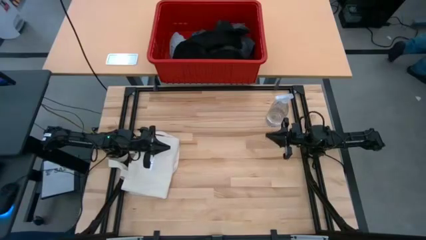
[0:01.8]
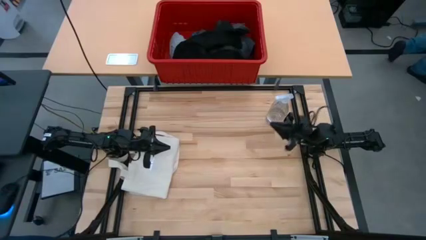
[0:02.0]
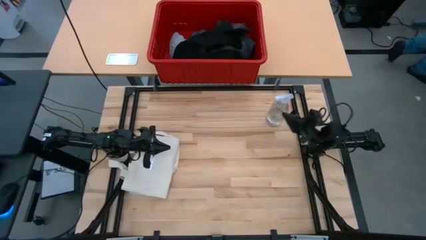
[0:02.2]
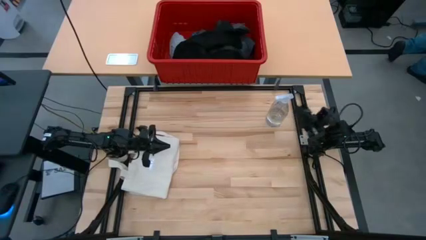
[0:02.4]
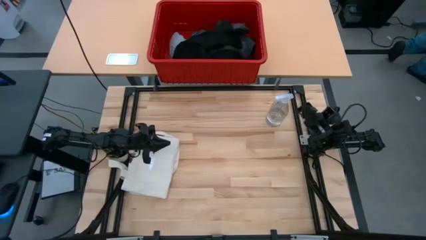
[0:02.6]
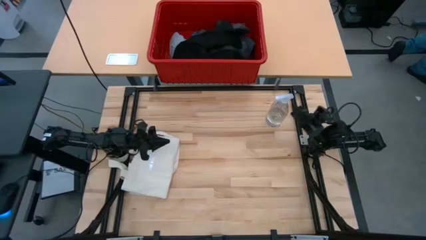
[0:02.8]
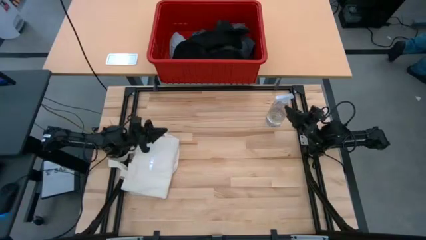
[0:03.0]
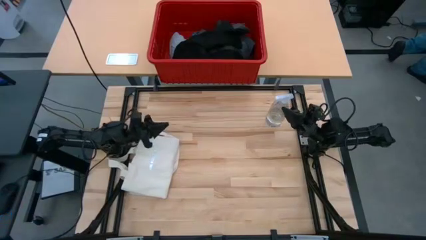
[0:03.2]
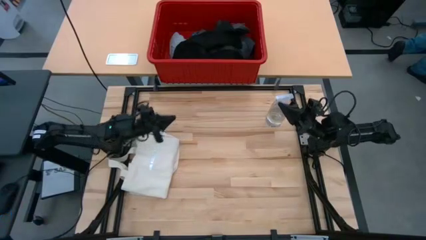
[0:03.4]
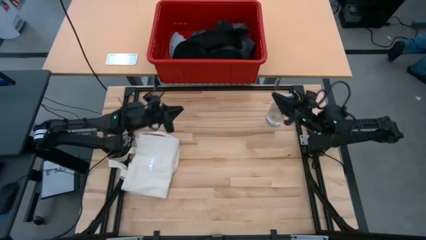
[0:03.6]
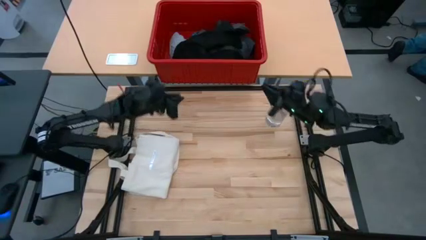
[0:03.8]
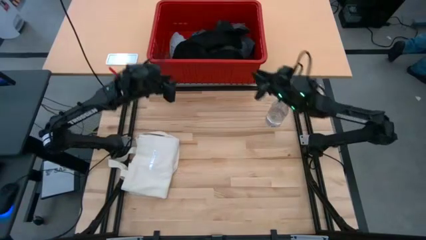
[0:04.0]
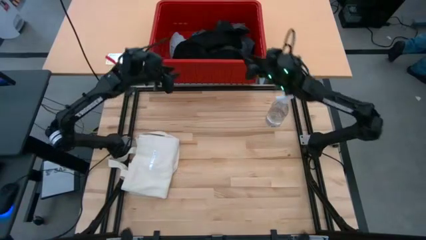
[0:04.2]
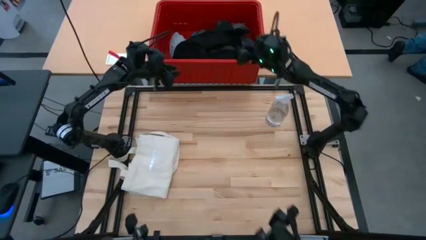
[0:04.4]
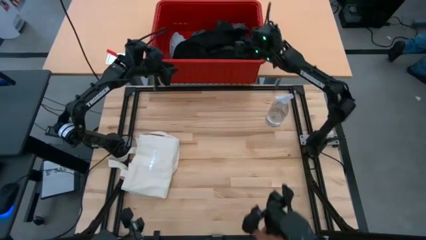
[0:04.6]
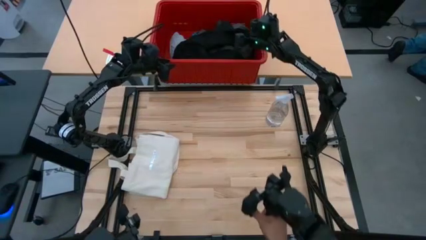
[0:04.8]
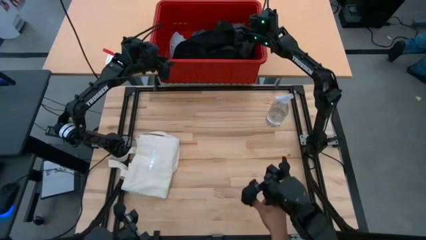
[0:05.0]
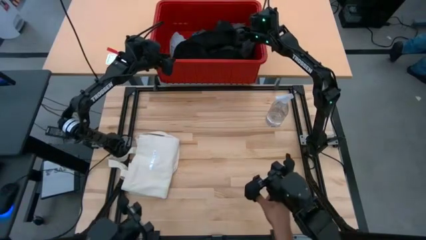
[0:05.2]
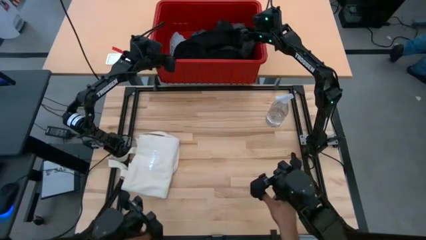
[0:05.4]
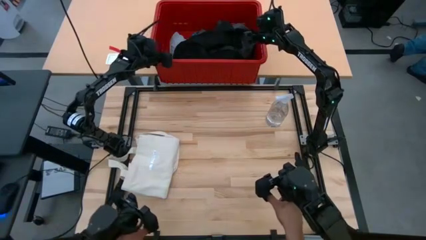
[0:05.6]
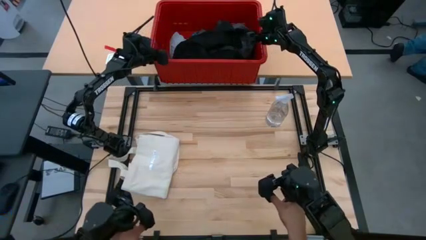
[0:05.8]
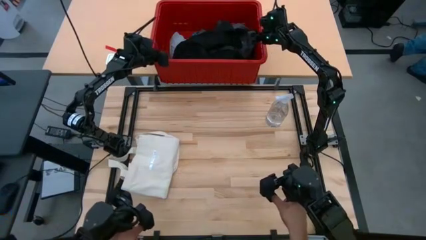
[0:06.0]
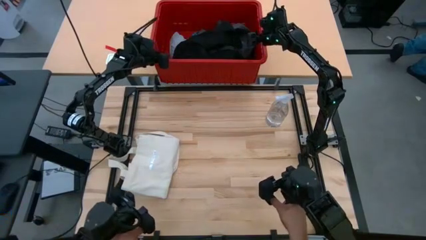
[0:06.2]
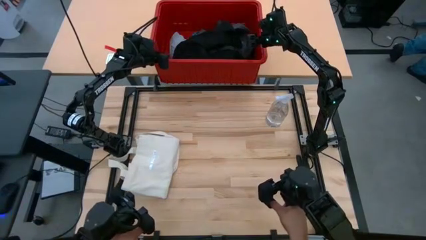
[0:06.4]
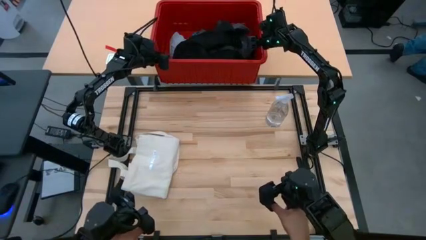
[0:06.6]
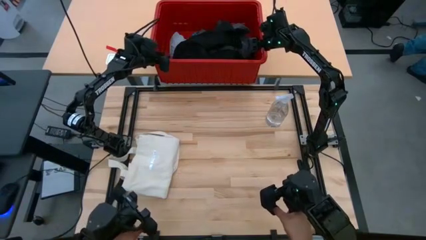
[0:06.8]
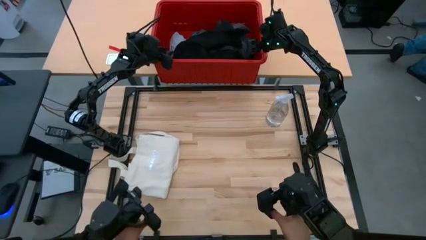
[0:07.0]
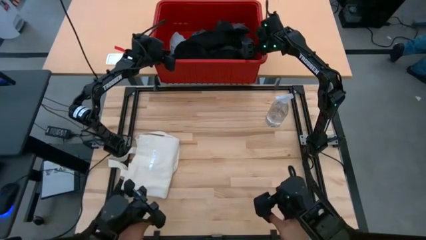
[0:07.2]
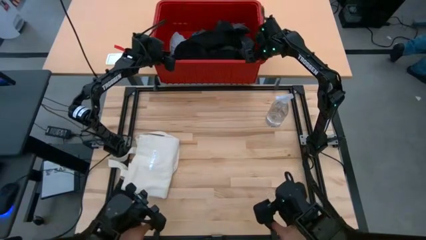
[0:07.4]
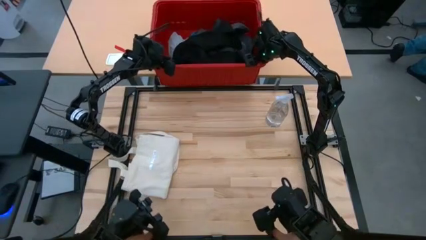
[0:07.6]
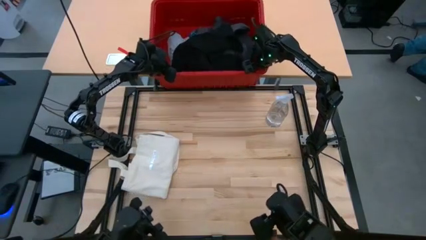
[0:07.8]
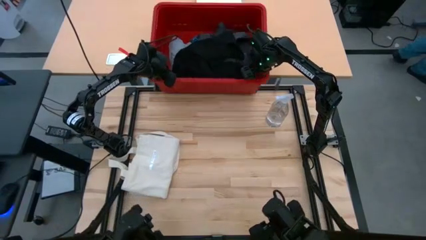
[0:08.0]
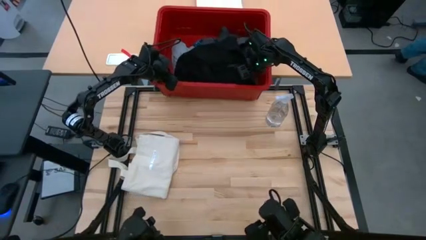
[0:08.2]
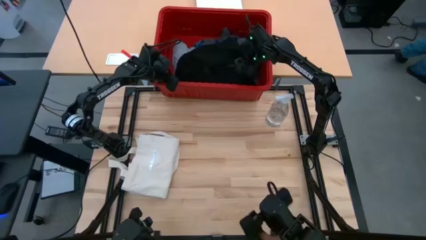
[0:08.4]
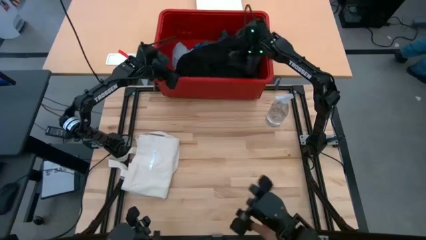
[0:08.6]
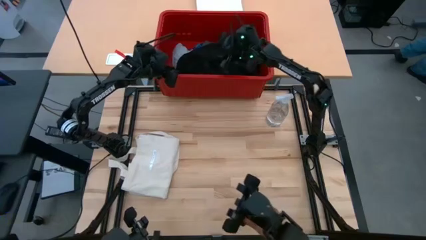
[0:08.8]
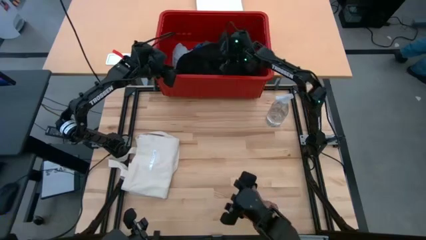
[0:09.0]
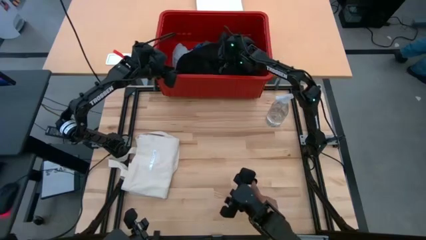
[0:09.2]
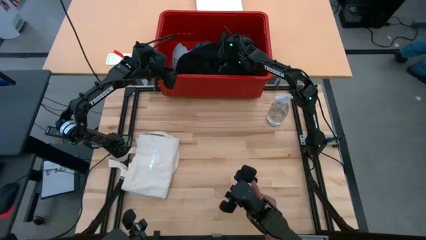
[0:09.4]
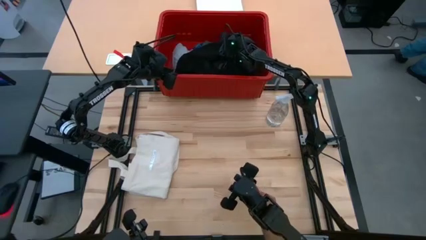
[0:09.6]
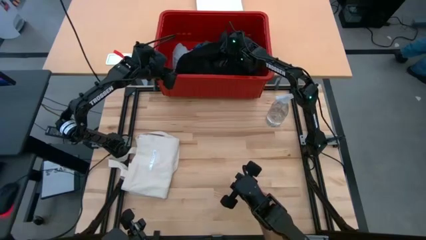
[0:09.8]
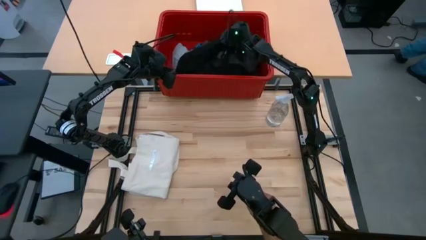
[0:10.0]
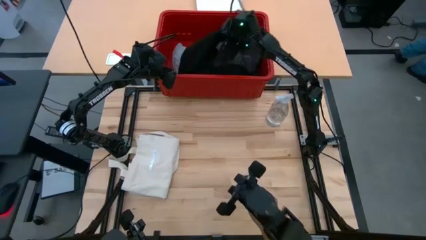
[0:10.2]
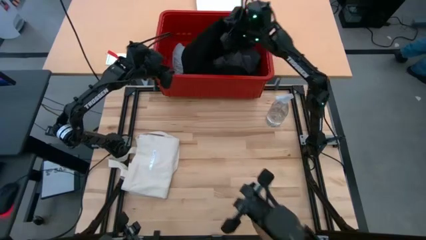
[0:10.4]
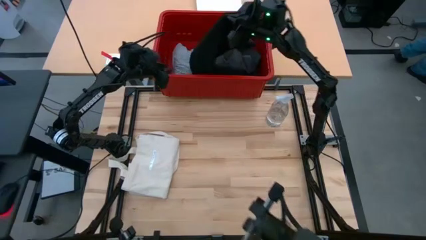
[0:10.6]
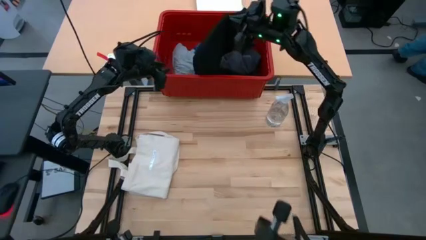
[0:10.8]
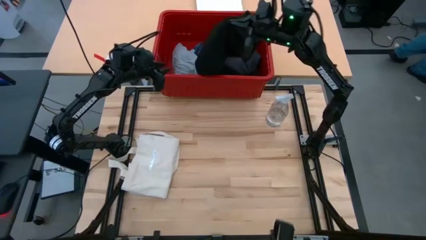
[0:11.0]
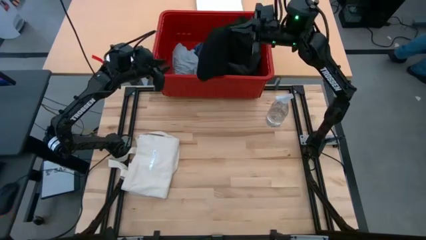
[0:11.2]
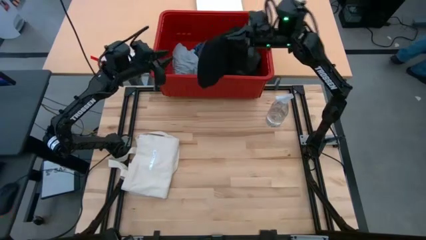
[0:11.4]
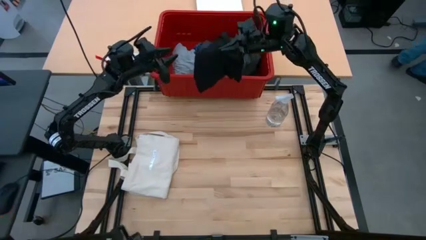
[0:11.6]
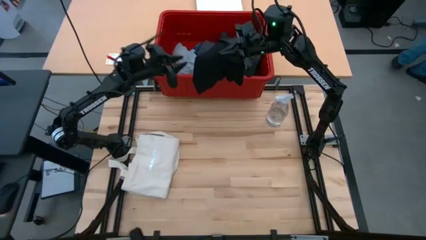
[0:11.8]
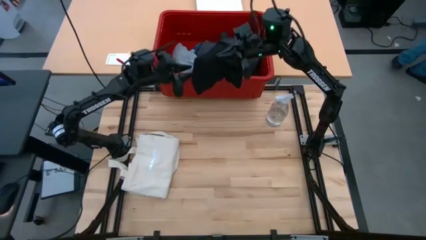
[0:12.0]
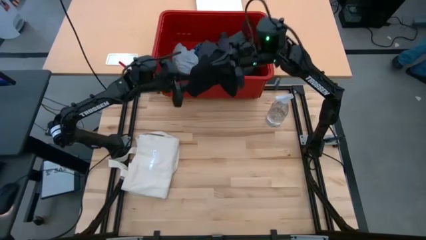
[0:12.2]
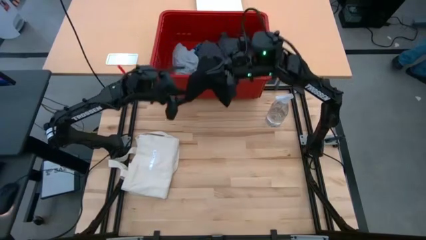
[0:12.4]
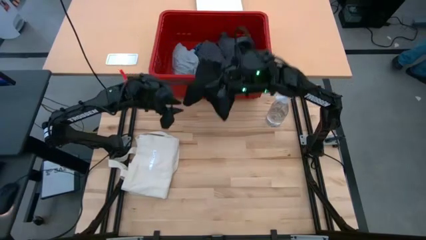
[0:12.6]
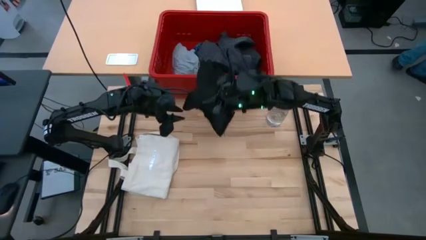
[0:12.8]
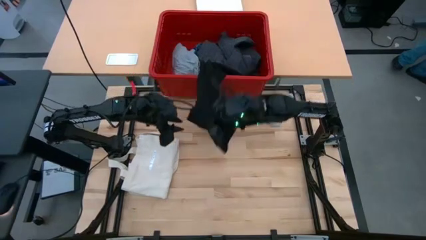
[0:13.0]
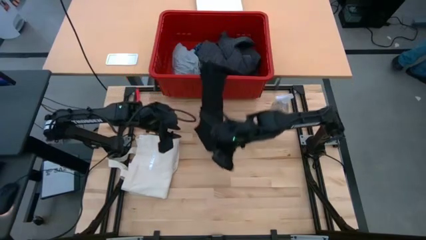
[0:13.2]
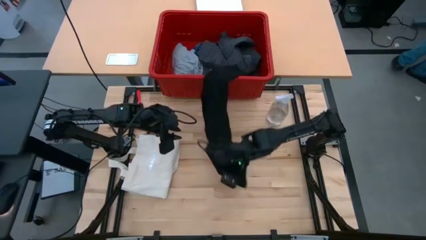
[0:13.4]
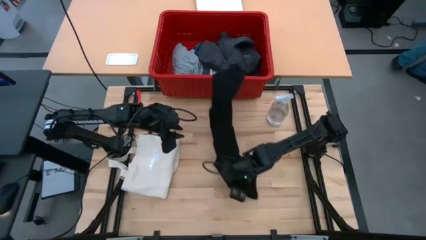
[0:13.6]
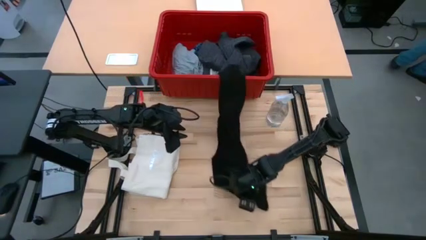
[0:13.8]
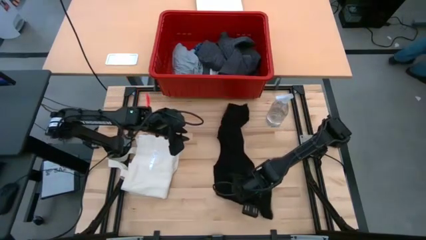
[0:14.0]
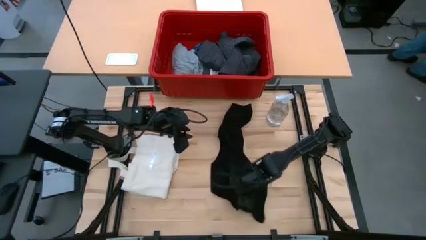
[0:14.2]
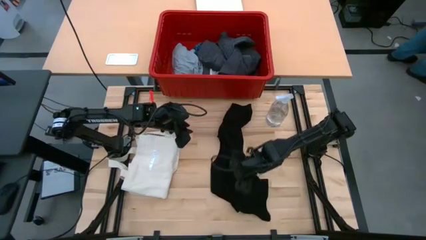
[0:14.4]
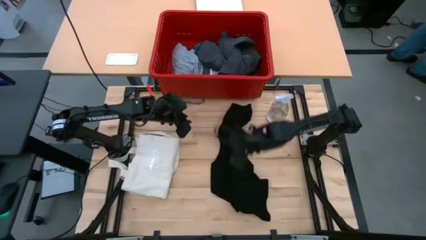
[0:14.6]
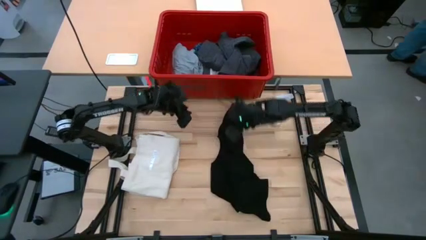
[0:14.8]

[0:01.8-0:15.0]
Task: Fold Laundry from Bin
Remove the black shirt from the red laundry bin
